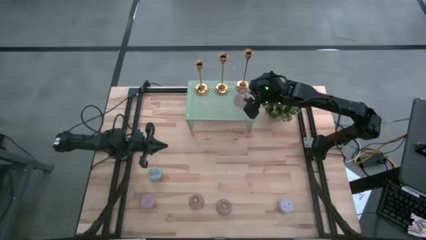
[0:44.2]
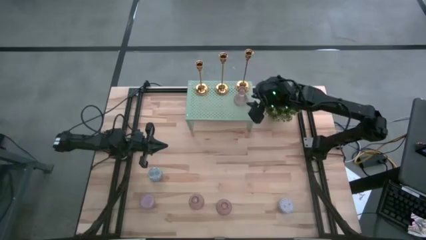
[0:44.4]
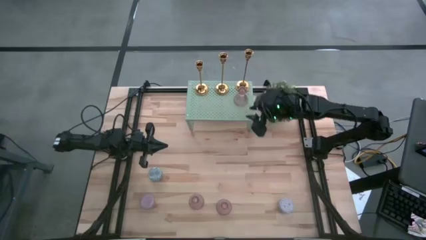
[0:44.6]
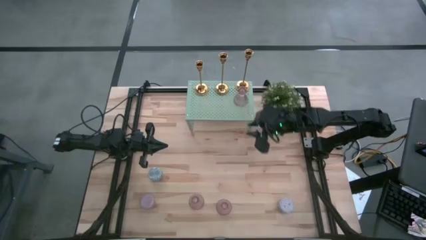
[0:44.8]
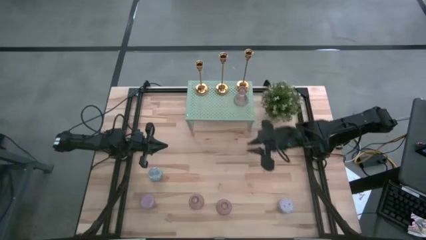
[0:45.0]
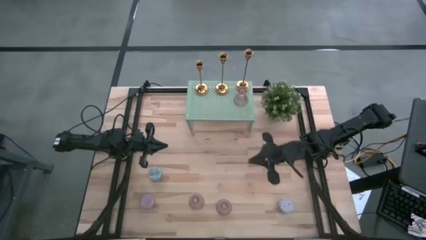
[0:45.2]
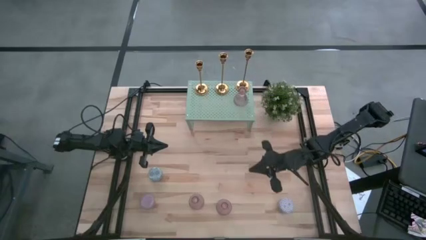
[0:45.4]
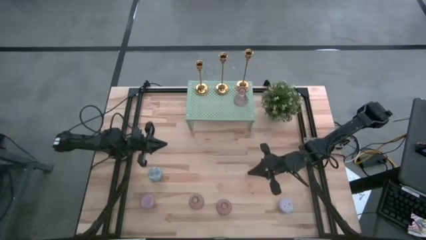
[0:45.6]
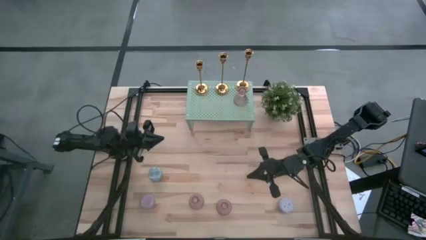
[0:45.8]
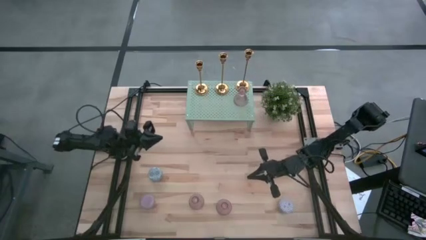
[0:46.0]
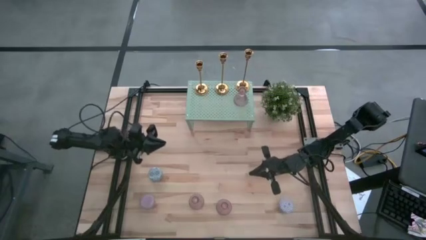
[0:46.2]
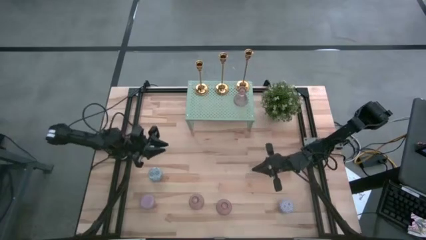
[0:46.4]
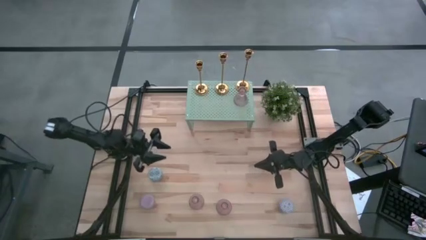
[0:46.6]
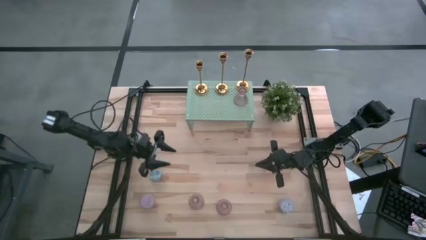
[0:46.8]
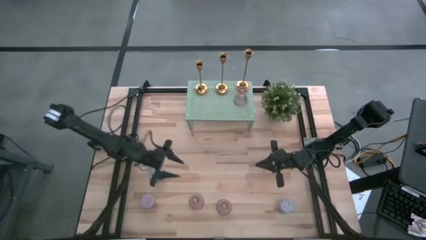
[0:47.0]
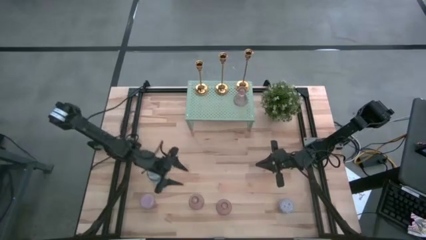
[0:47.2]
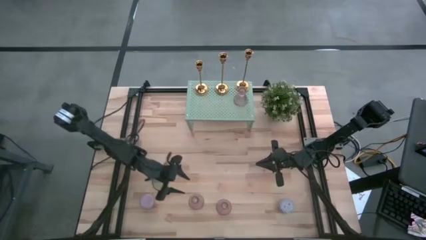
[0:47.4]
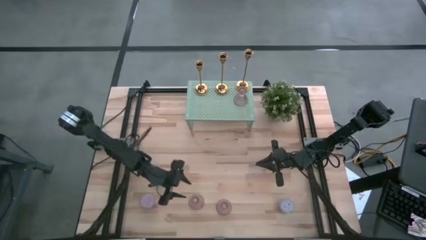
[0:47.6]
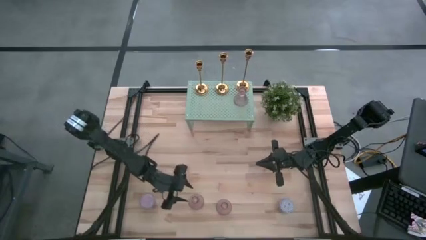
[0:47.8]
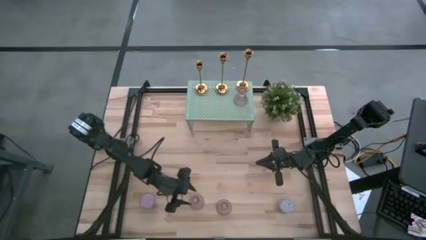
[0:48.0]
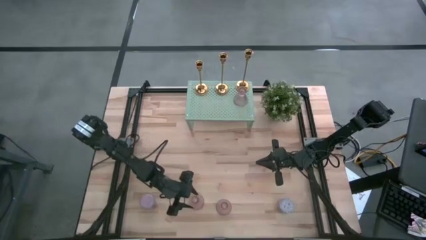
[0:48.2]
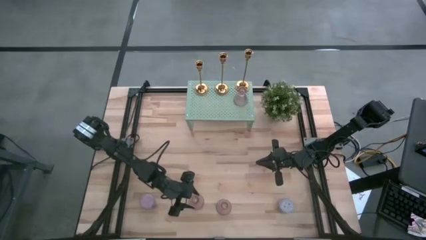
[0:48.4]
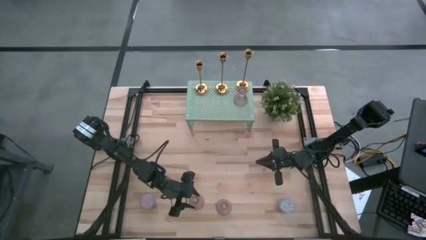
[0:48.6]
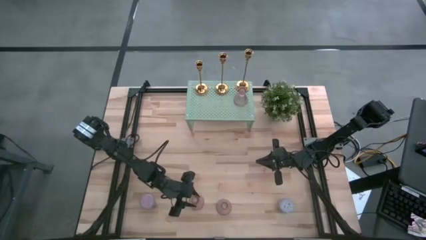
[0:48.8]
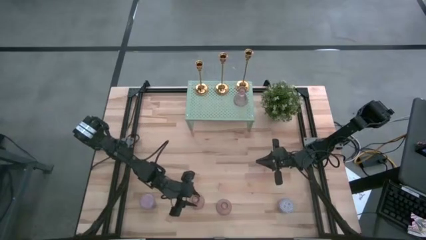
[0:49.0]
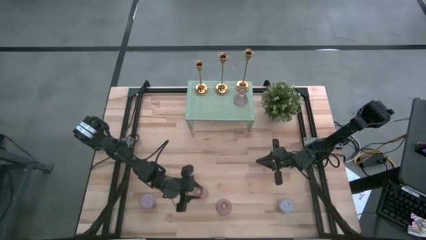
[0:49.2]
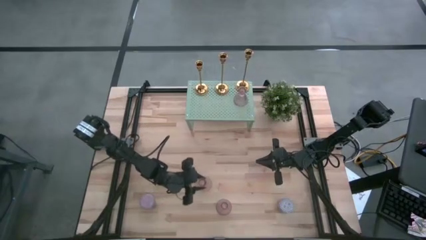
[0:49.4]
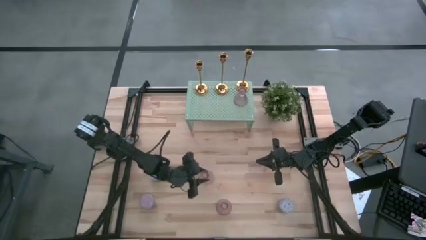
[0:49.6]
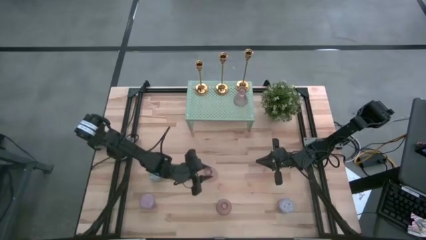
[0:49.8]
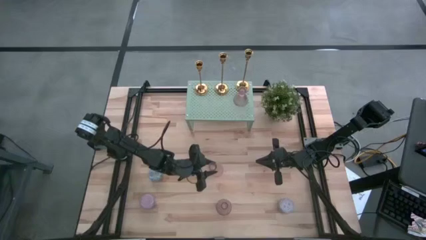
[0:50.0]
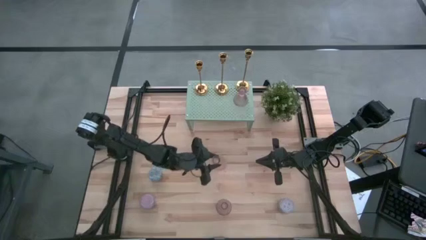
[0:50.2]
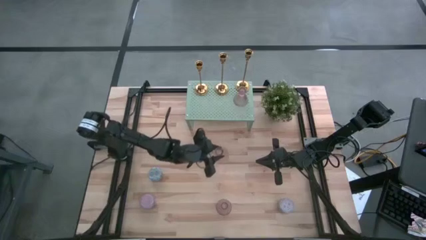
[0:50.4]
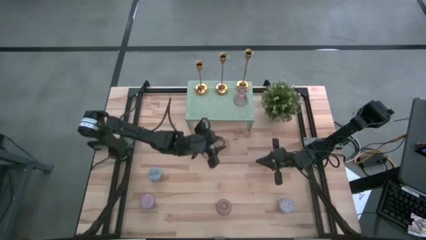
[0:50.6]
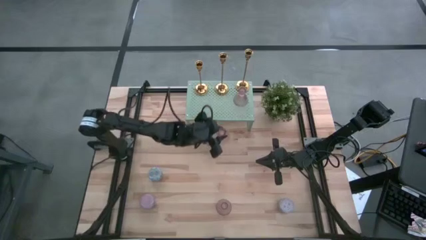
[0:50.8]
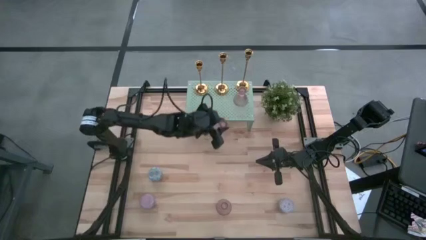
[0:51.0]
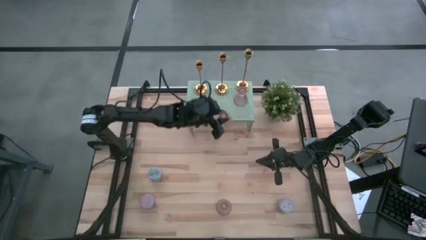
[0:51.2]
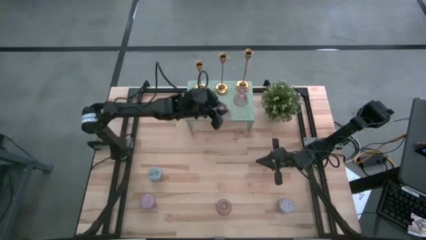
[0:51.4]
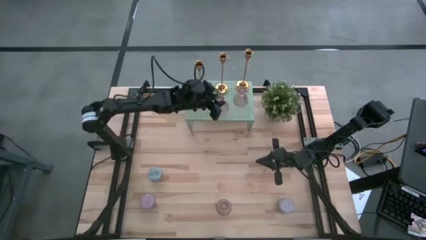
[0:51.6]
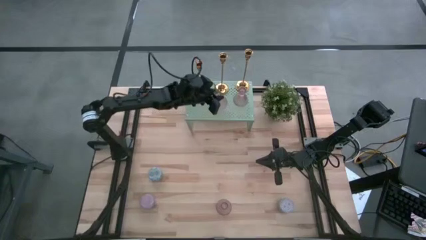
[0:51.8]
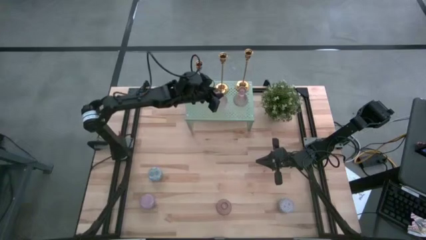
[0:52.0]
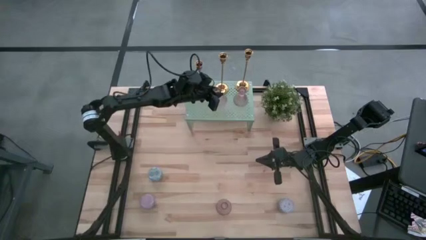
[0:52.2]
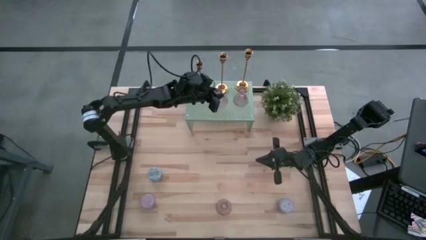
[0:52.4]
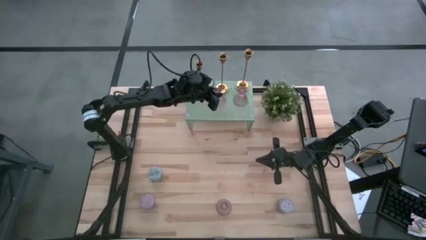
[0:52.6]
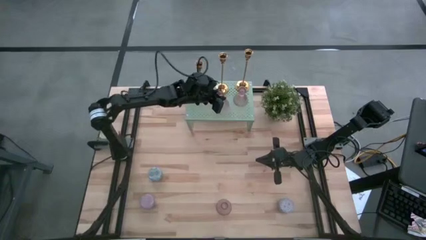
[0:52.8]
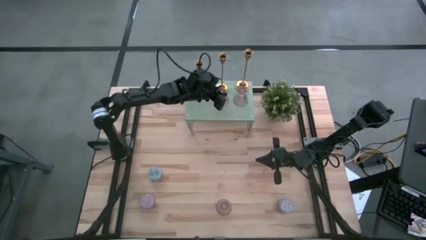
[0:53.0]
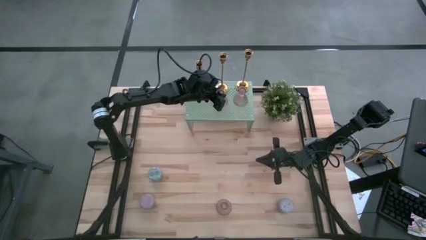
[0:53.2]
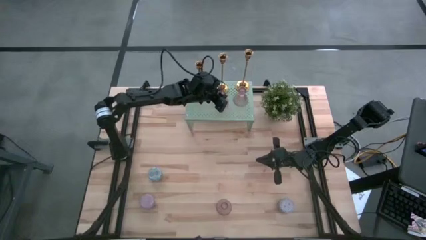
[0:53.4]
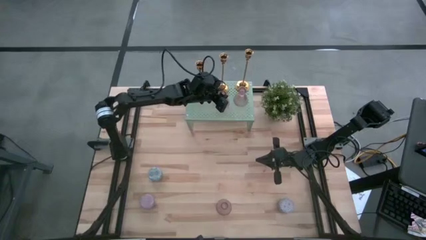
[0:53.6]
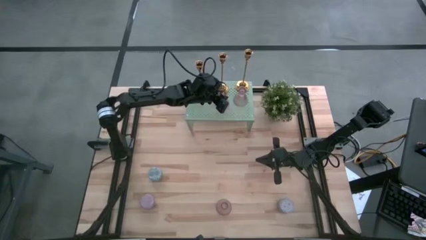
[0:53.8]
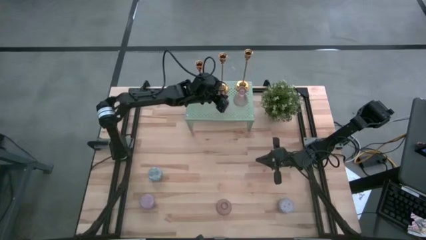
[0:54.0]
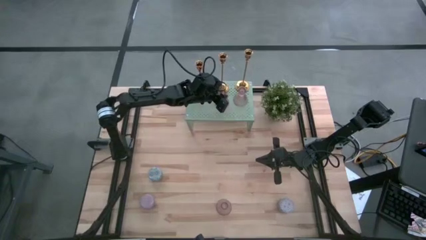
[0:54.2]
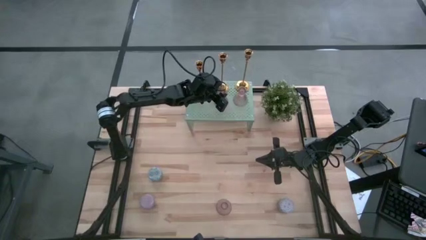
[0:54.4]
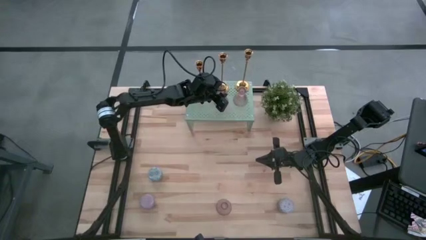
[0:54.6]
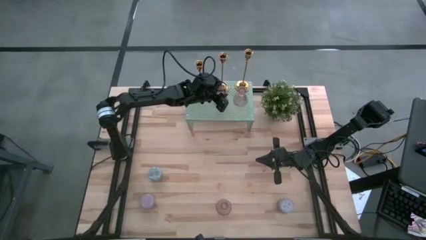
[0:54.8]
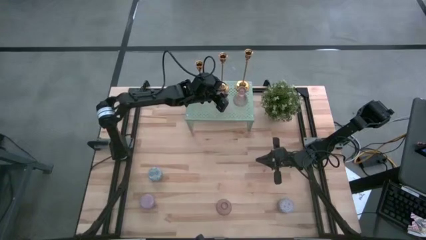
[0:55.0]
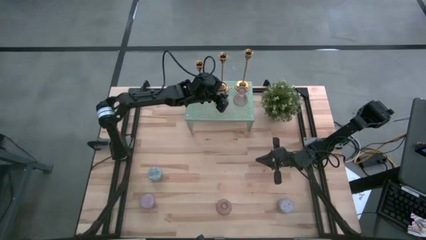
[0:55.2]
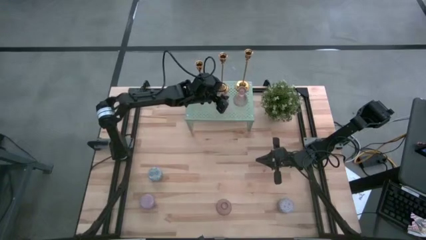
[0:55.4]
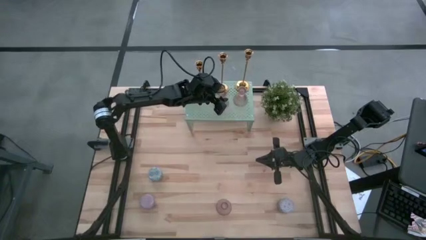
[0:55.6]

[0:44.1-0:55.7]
Task: Pick & Place candle stick holders
Put the left pink glass candle holder on the shelf aligned with the other pink glass candle holder
